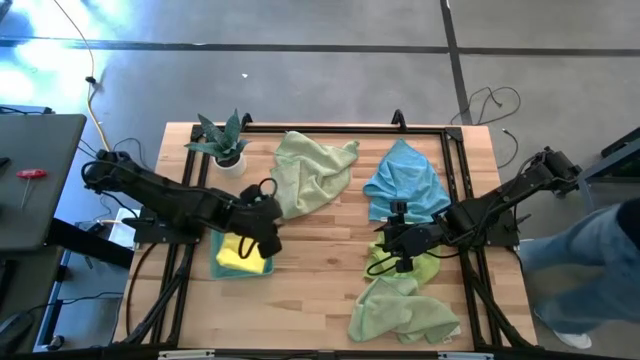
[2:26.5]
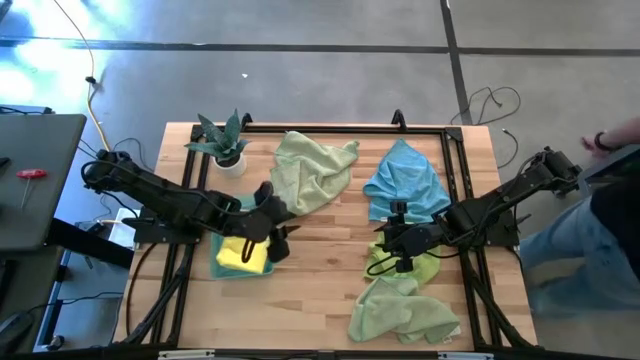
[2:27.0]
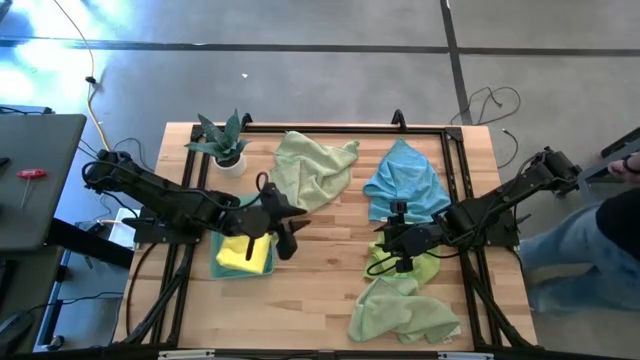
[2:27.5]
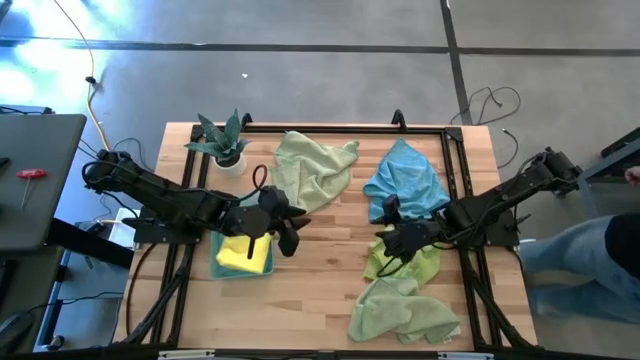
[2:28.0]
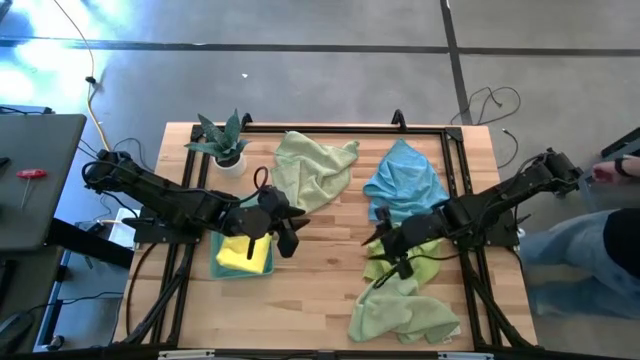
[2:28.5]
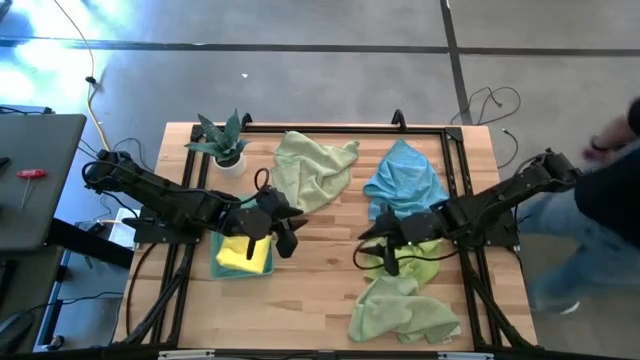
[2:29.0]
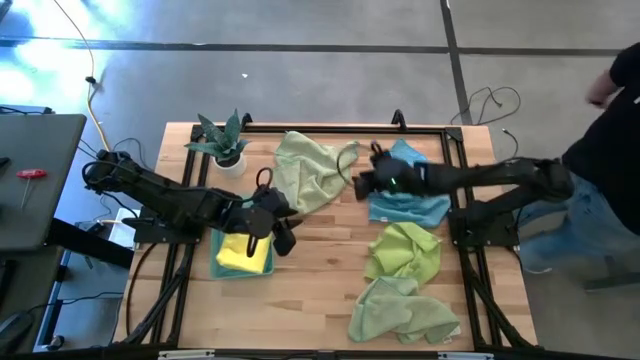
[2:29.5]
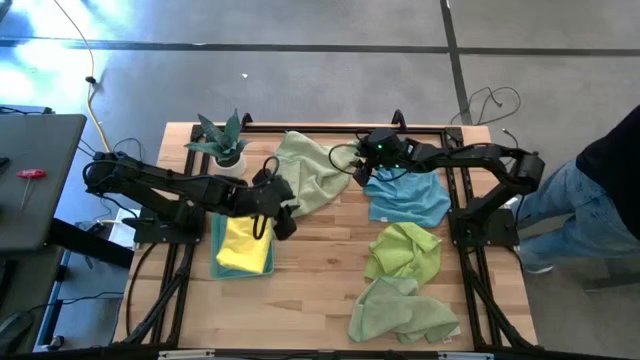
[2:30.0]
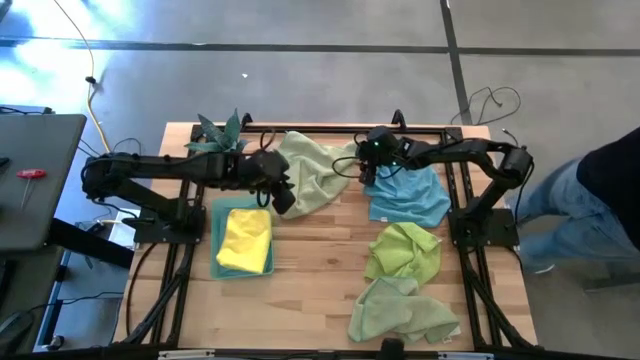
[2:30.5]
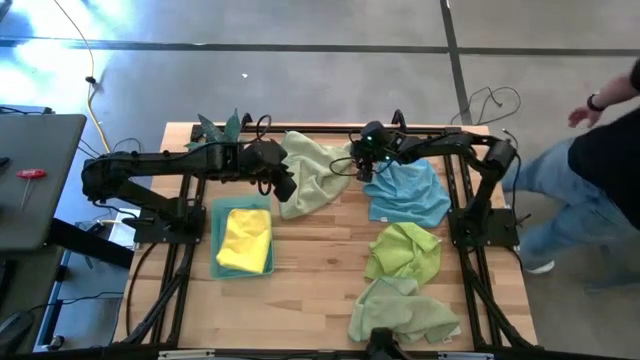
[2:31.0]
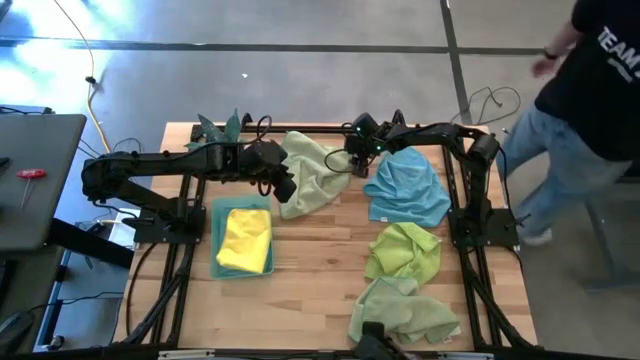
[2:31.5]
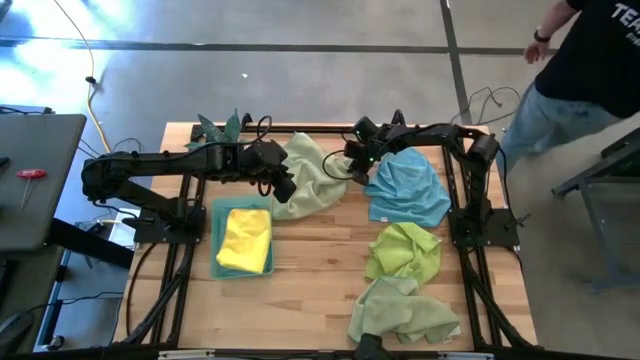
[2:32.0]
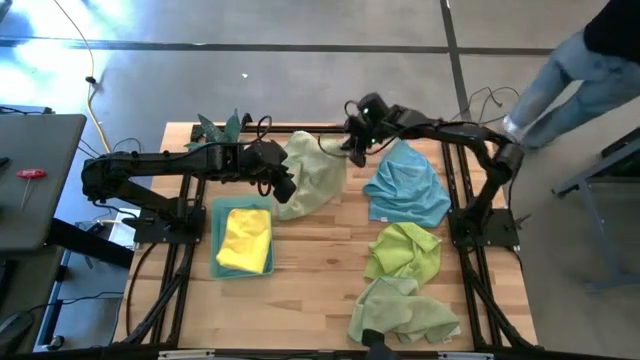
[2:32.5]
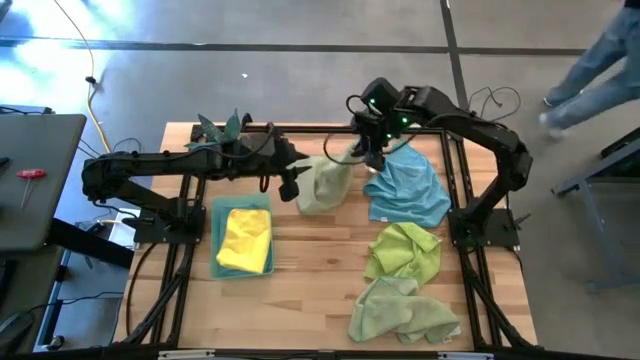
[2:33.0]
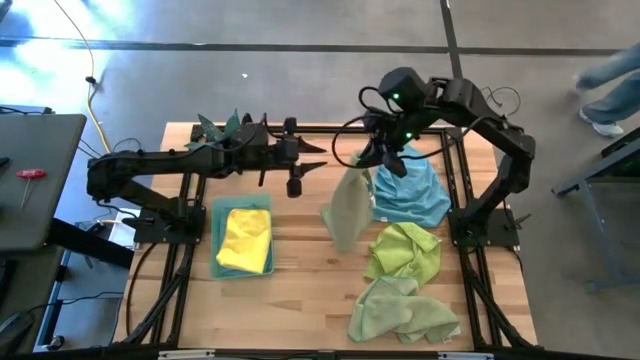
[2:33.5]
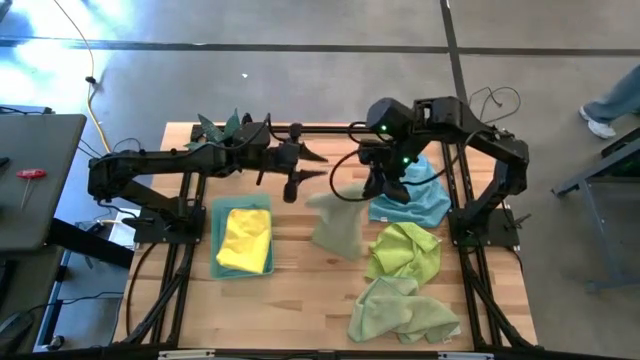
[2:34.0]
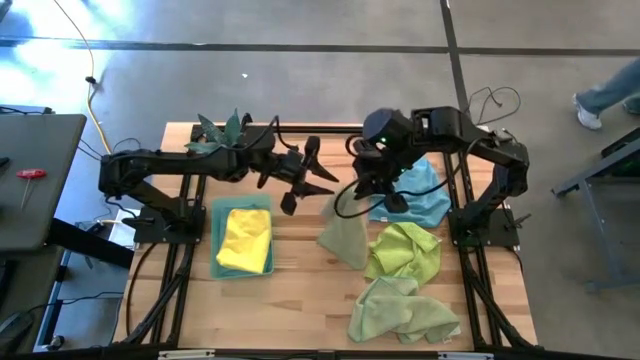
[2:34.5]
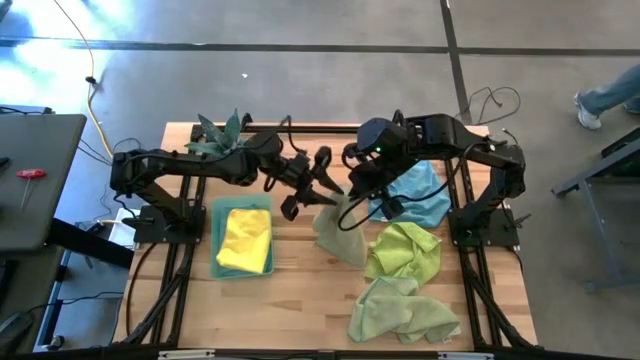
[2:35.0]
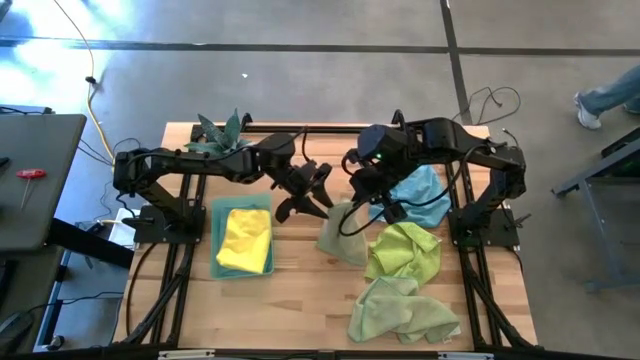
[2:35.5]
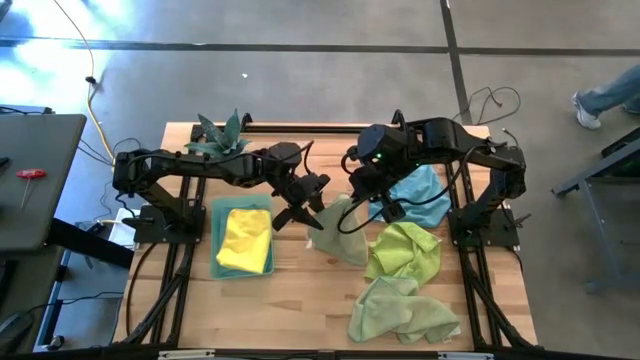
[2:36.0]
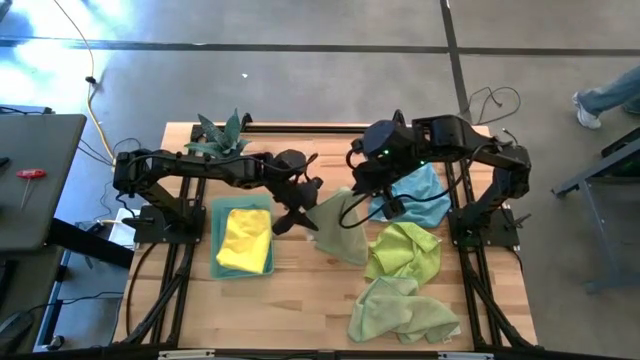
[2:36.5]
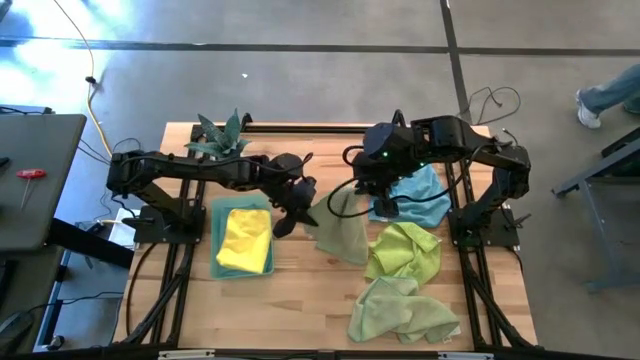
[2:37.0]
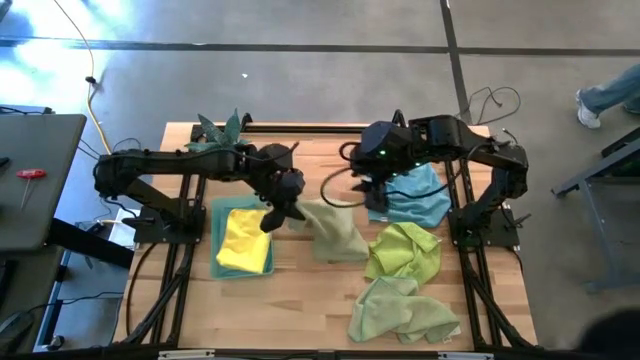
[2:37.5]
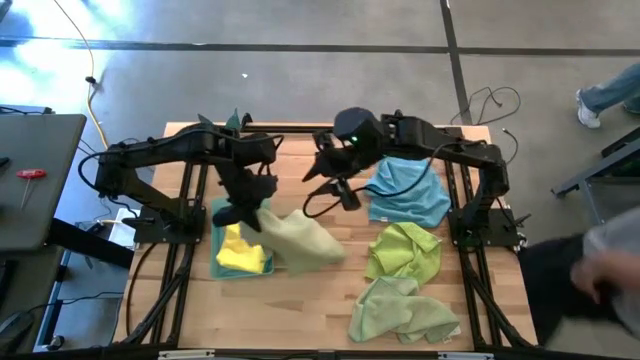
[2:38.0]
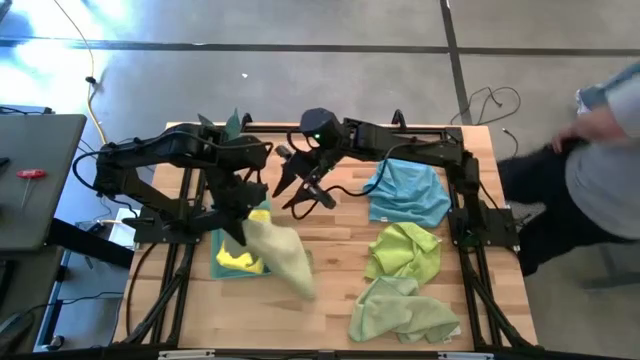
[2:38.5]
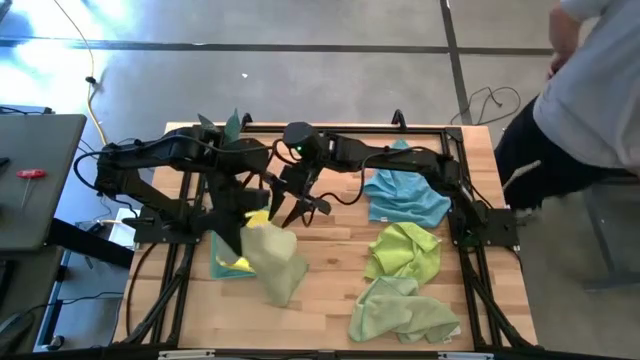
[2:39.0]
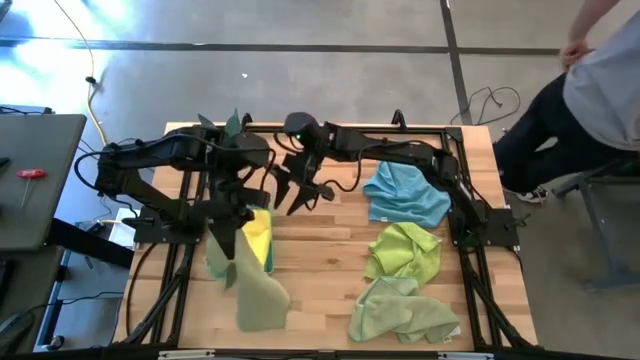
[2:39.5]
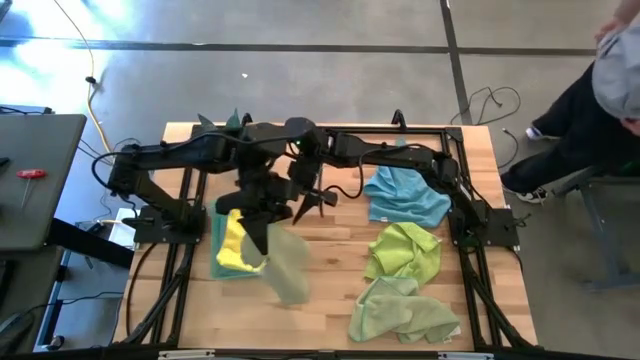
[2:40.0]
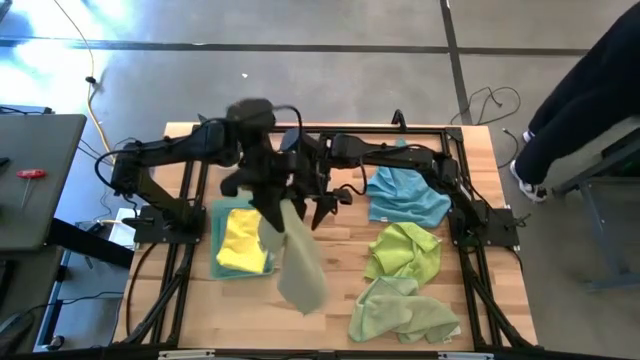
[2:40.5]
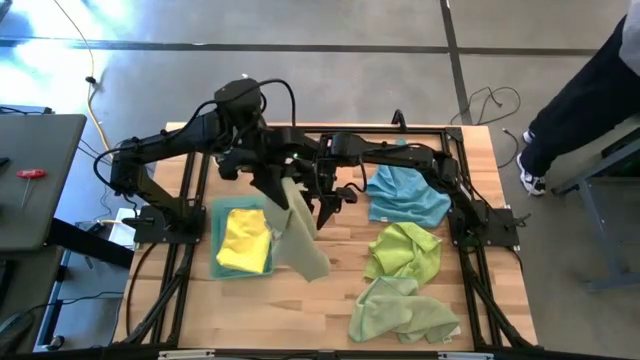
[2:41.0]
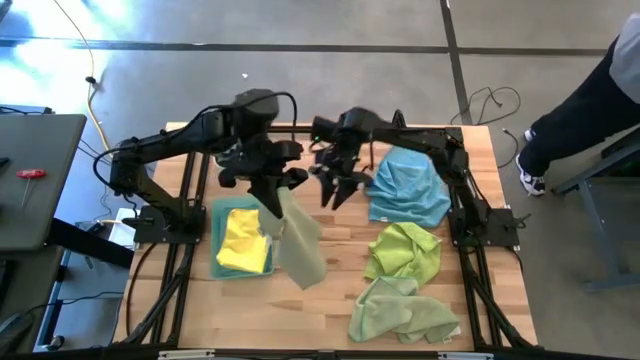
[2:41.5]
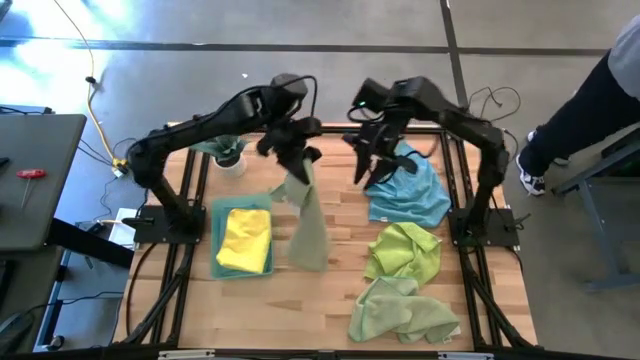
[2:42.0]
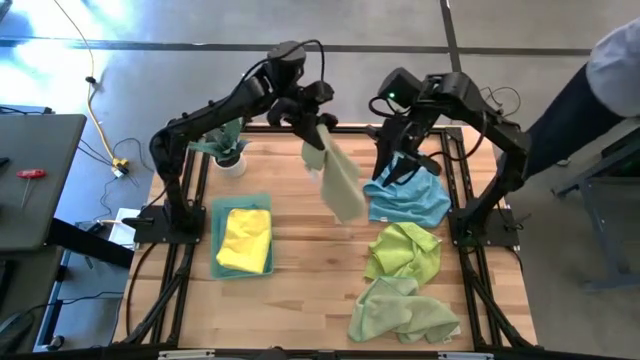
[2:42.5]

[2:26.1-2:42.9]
Task: Fold microfiber towels
Fold the top green microfiber towel

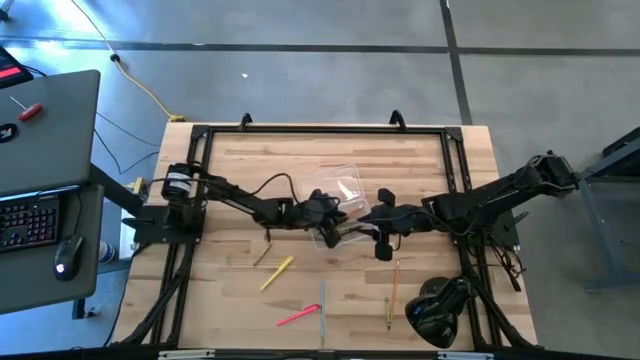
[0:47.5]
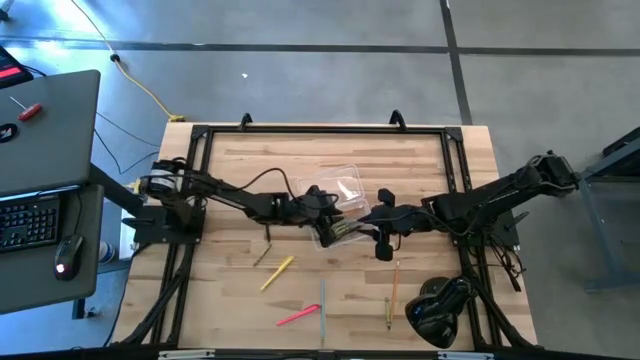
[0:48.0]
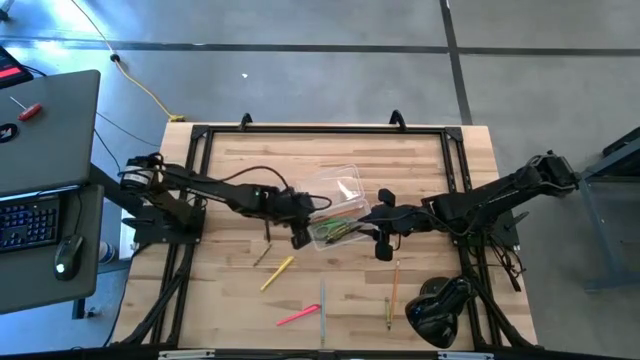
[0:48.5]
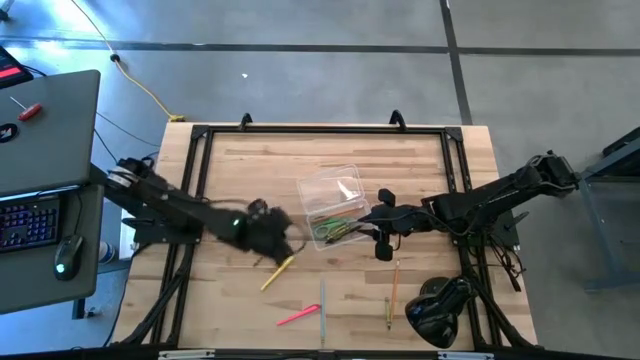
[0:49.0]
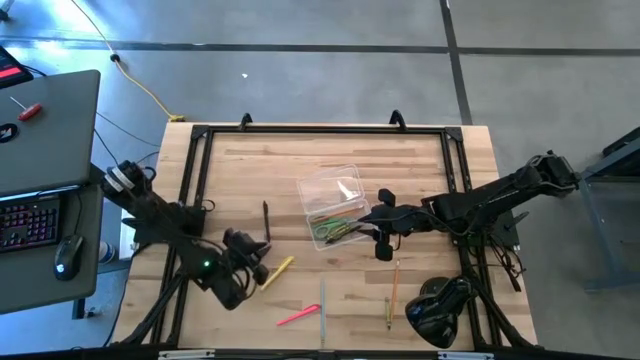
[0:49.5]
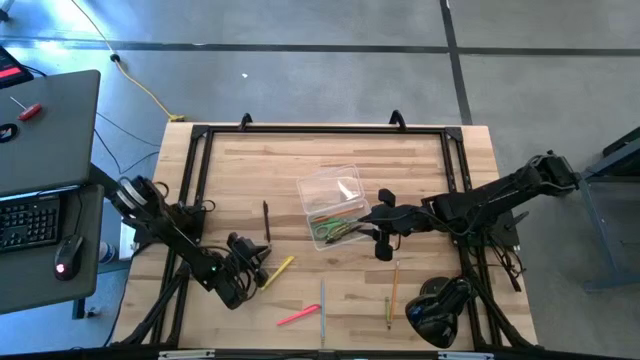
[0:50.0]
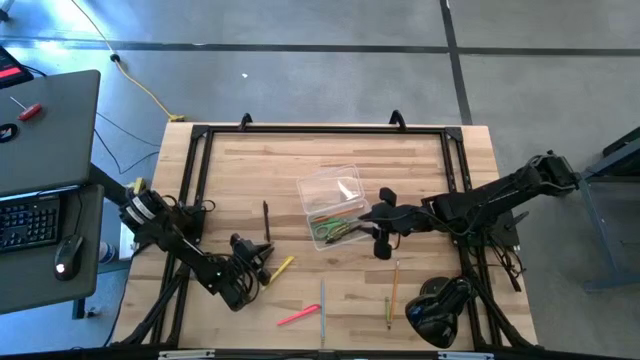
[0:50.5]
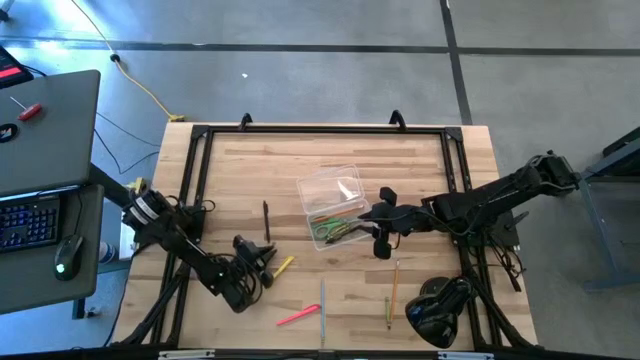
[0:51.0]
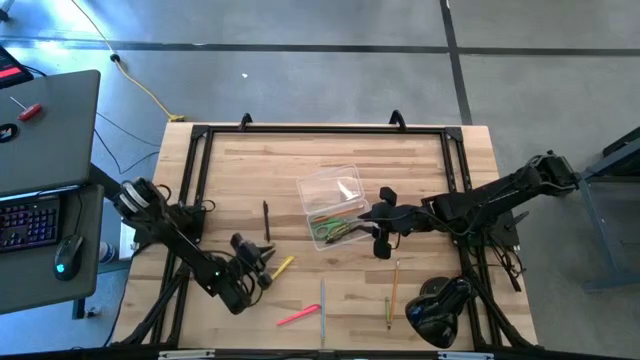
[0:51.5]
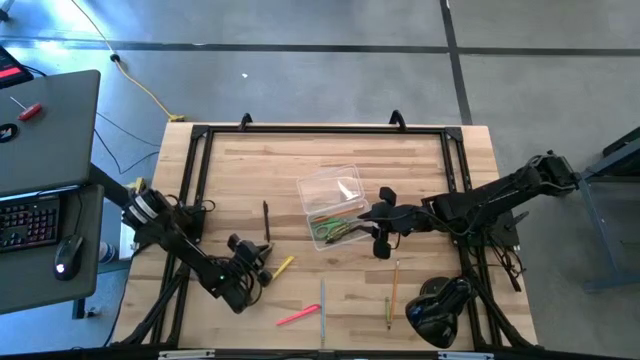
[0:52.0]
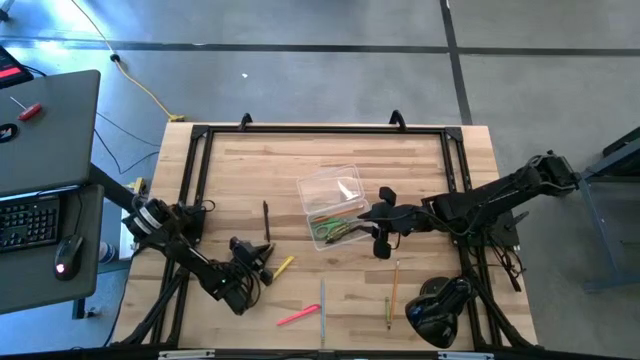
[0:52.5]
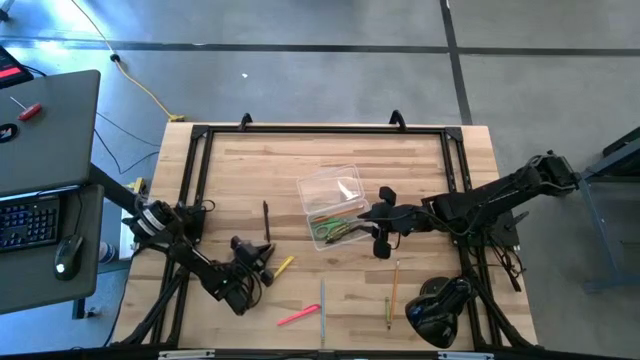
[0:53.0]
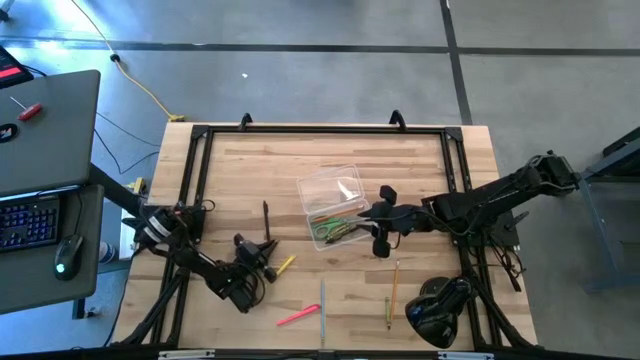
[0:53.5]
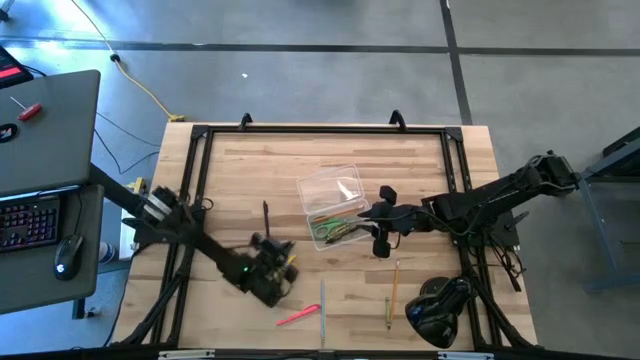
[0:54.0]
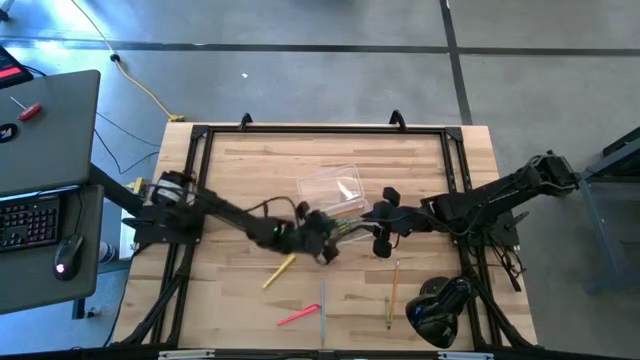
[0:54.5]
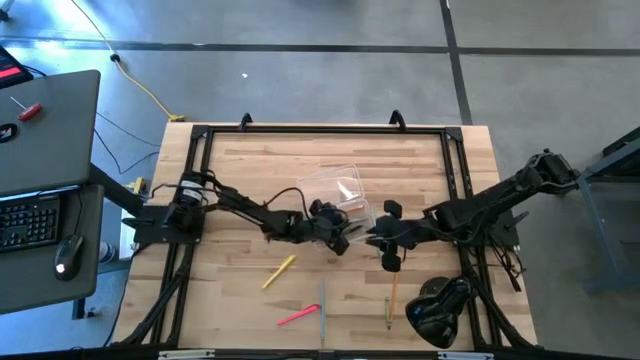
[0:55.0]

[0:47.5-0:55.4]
Task: Pick & place school supplies into a supply box
Put the green crayon into the supply box
